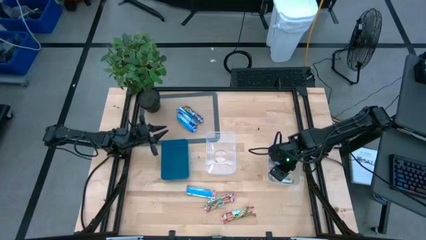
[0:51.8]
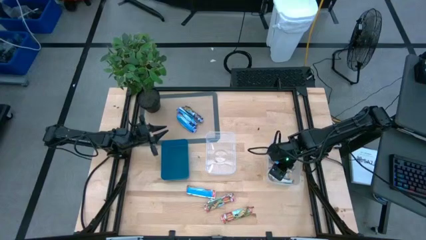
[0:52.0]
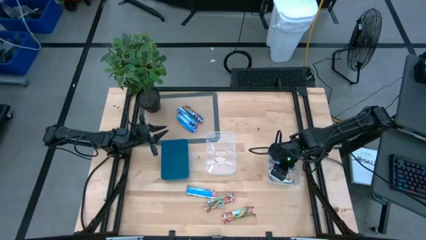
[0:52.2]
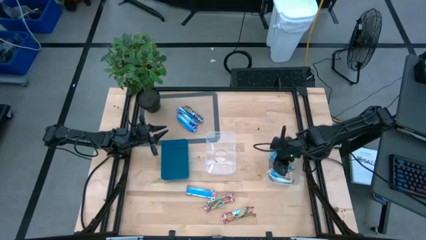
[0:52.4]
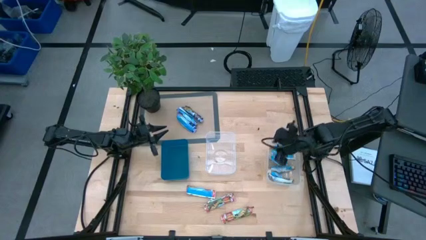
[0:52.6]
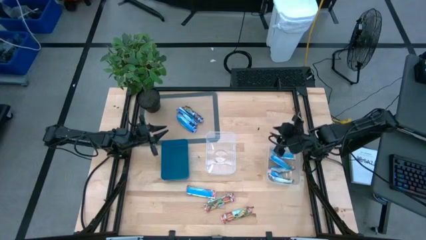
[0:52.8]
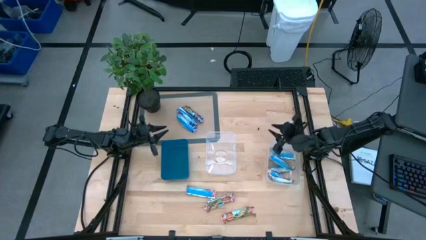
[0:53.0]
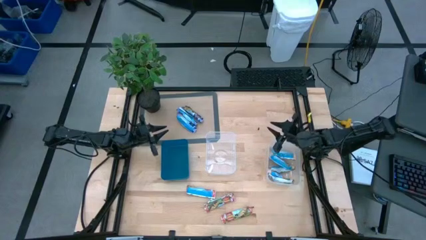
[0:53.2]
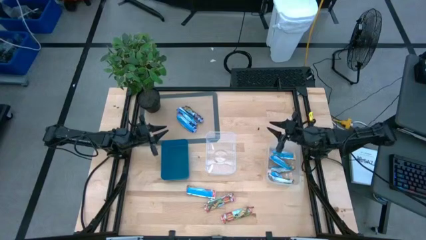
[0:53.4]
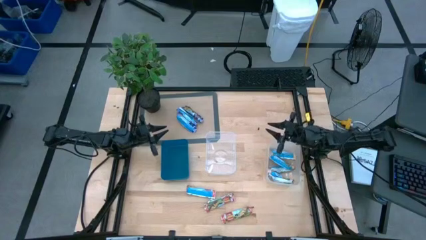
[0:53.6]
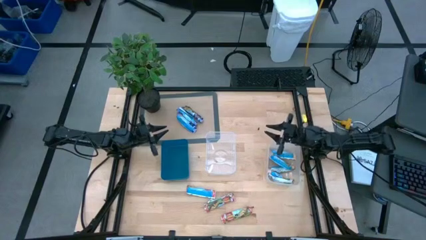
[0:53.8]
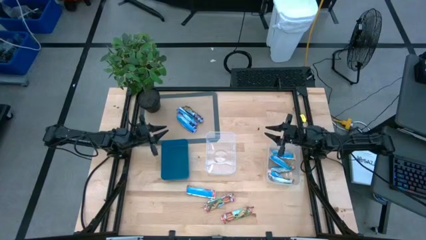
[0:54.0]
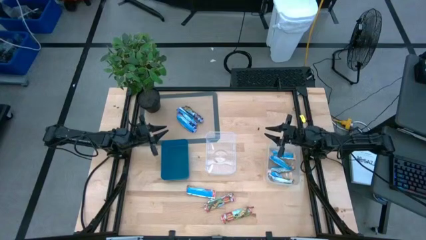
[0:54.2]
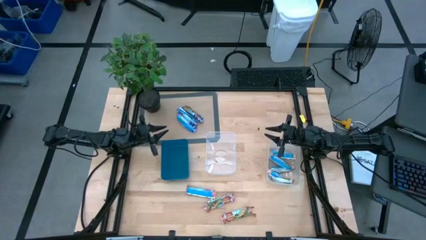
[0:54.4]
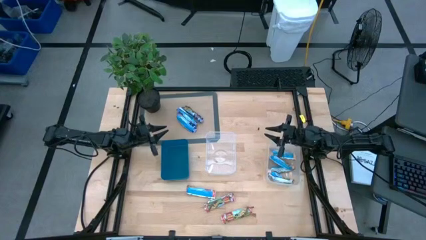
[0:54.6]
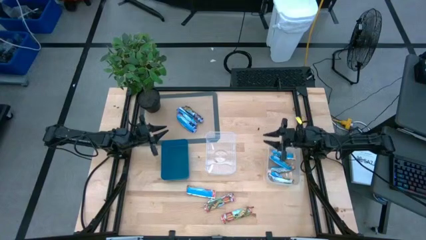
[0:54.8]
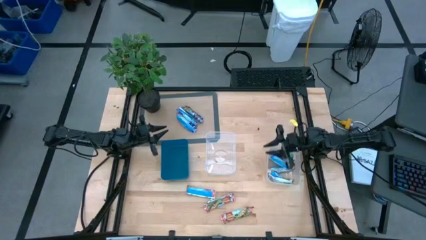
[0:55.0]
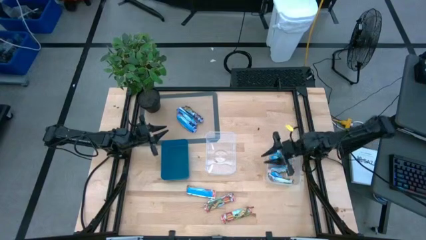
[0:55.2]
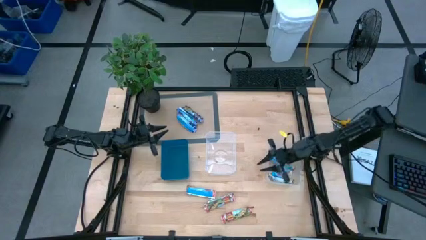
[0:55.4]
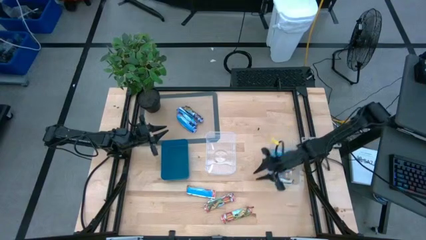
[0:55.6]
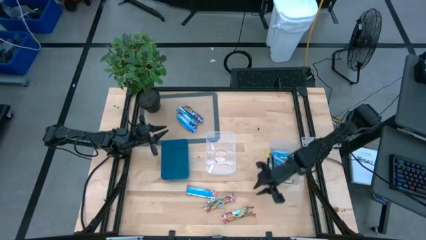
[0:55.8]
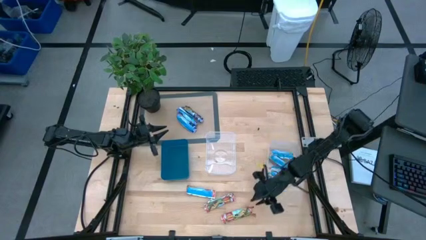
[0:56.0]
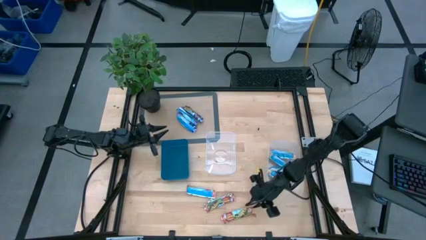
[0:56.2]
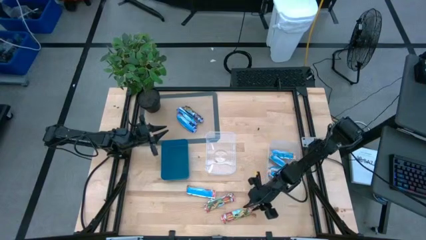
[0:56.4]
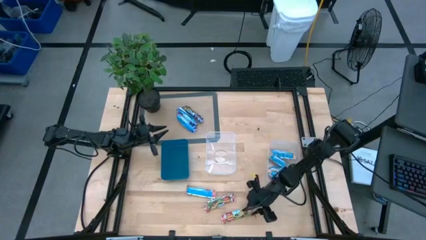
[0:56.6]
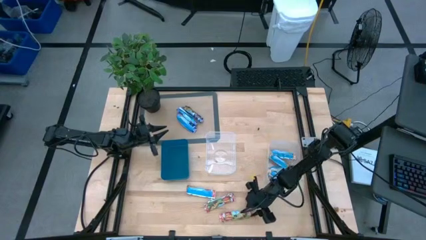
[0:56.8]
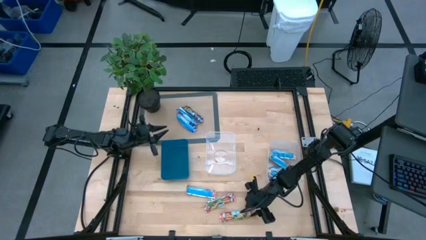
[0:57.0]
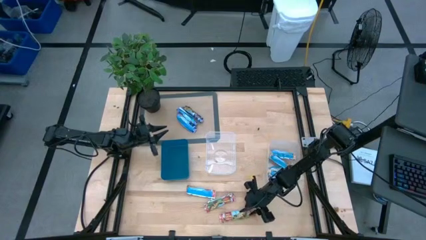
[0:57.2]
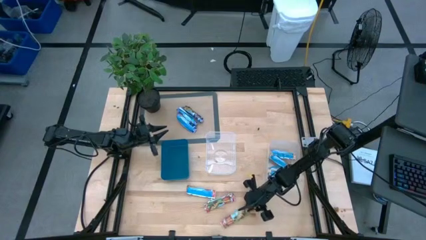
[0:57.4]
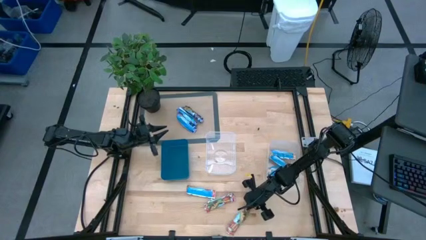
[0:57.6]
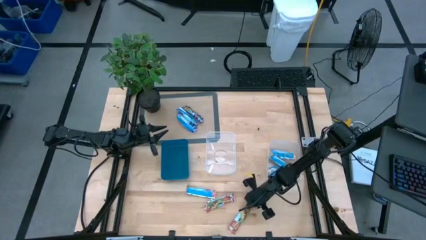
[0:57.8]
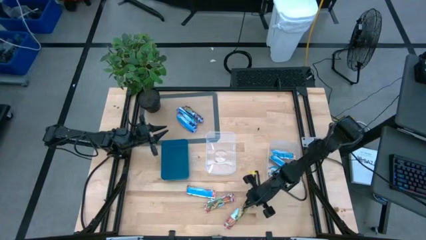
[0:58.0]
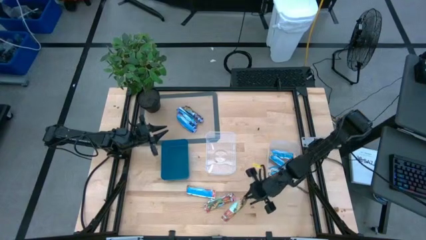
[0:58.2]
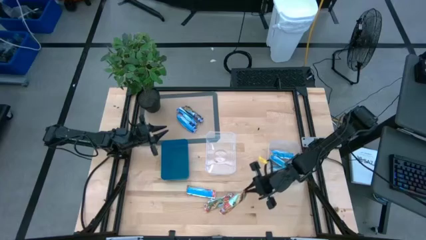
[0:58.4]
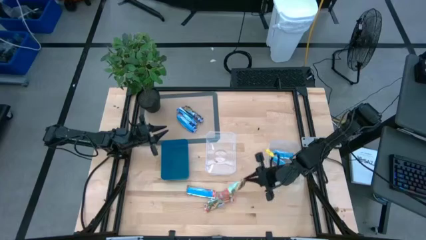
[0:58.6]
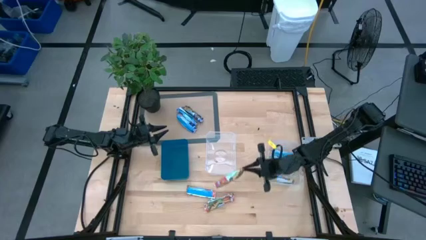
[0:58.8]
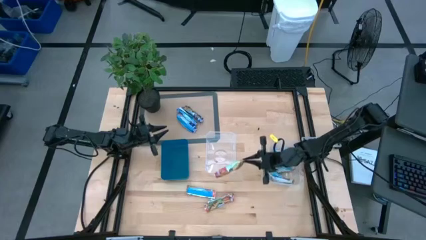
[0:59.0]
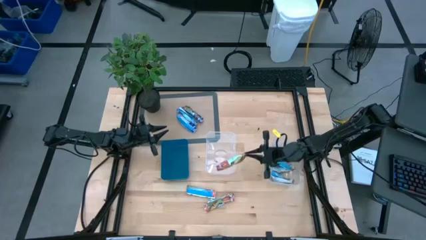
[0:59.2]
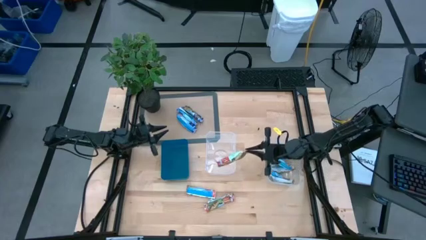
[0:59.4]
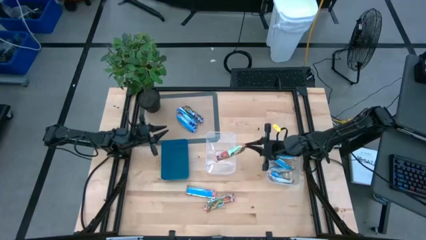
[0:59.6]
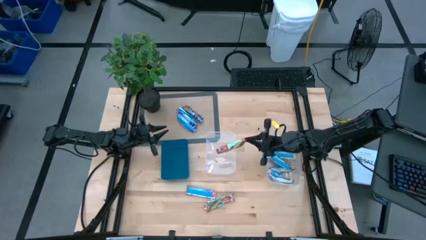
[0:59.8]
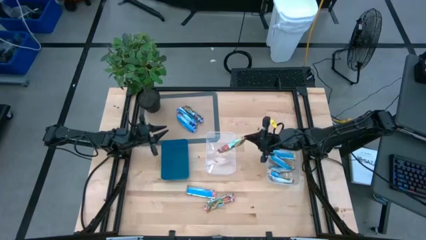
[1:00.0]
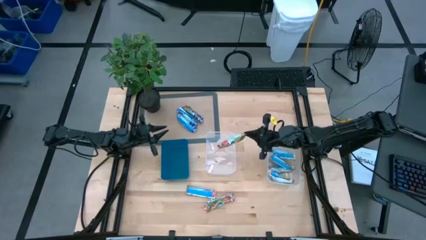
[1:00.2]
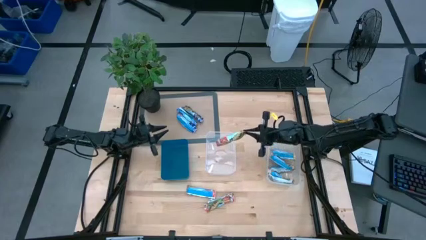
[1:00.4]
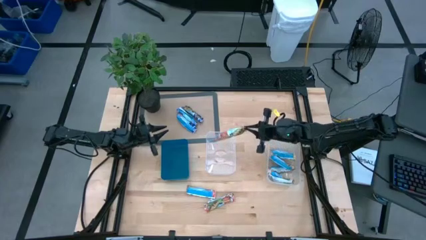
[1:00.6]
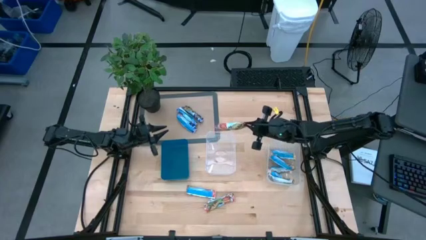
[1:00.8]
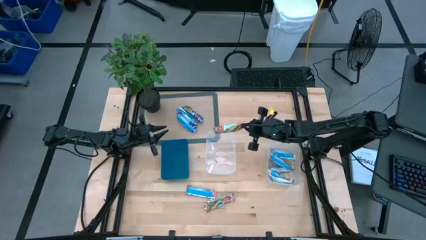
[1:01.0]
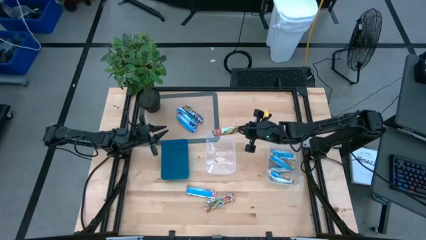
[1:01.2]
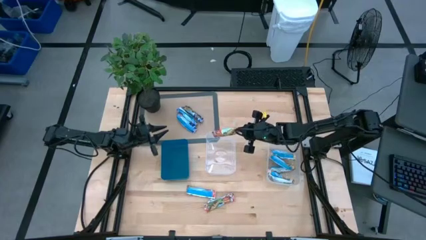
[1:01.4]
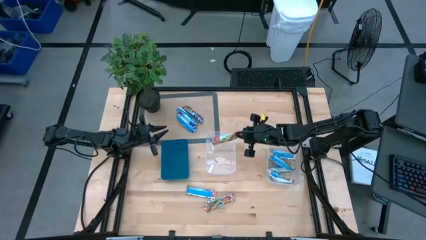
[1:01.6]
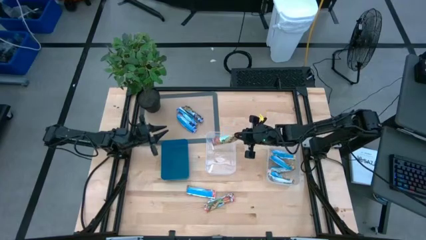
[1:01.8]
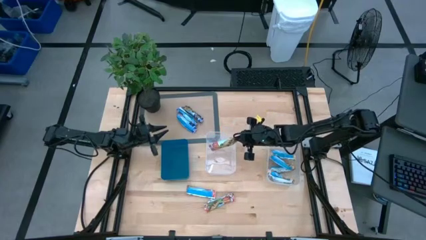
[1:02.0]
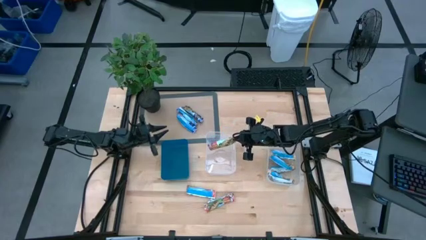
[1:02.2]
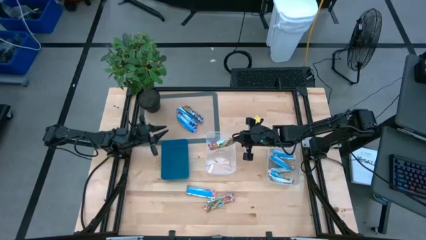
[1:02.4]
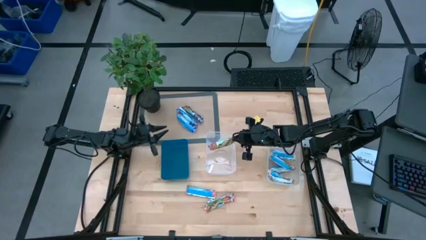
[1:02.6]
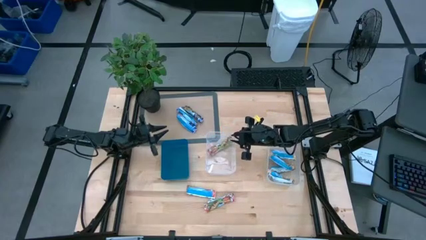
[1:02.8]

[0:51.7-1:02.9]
Task: Pick and place Granola Bars by type
Put the red granola bar into the left transparent bin

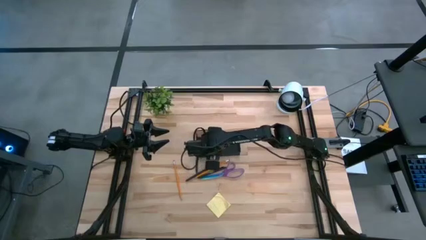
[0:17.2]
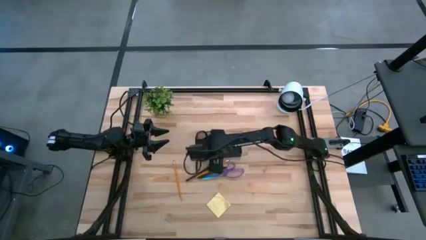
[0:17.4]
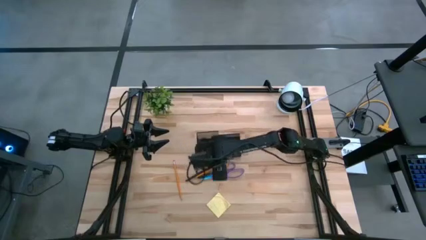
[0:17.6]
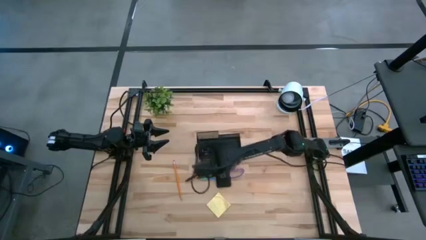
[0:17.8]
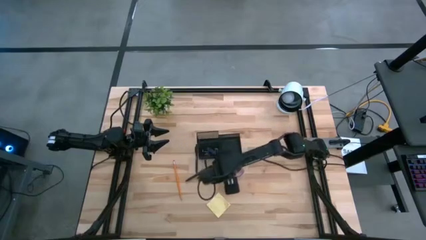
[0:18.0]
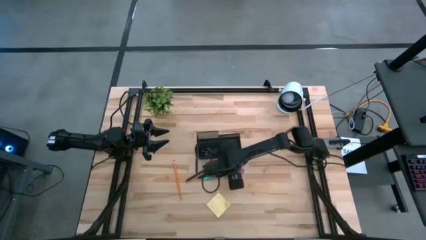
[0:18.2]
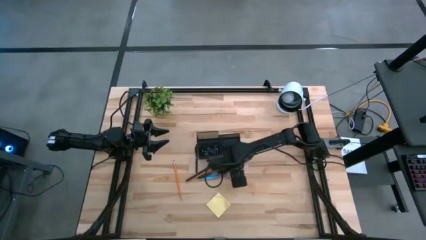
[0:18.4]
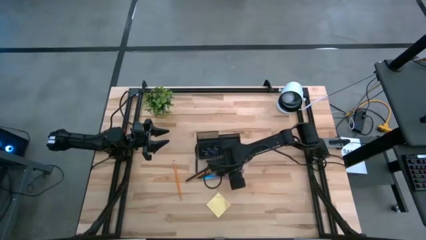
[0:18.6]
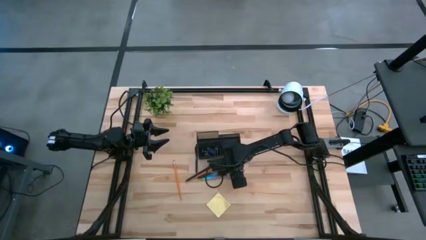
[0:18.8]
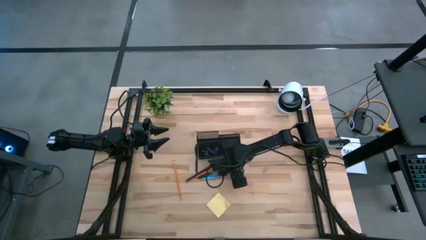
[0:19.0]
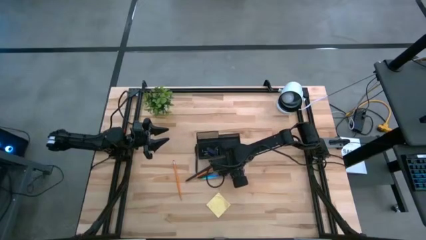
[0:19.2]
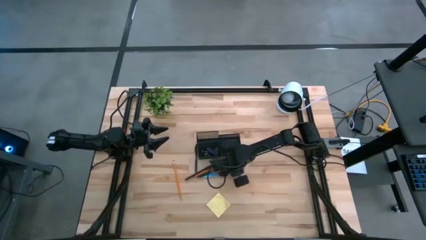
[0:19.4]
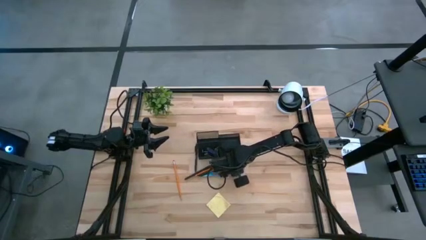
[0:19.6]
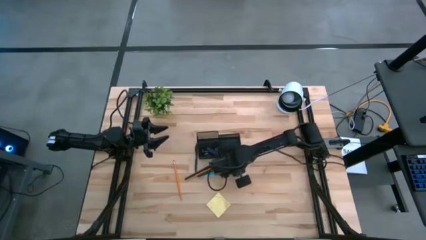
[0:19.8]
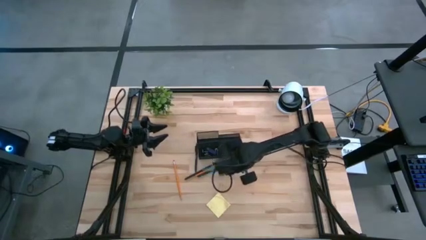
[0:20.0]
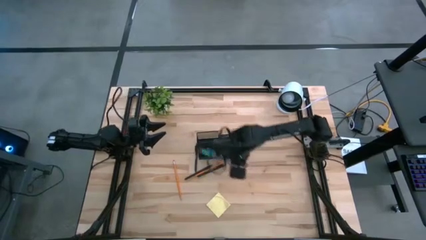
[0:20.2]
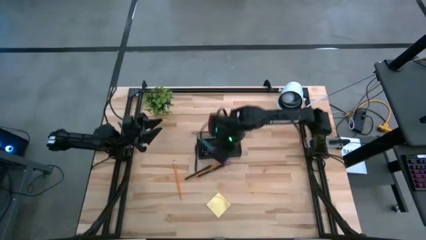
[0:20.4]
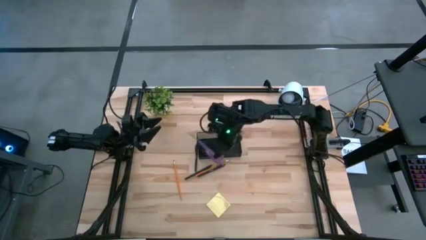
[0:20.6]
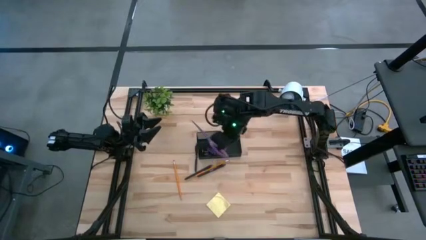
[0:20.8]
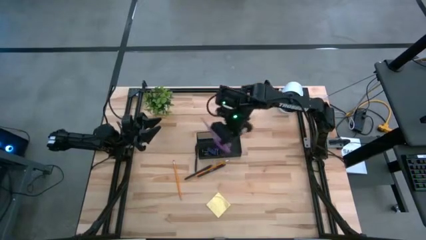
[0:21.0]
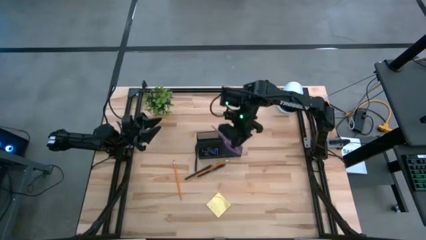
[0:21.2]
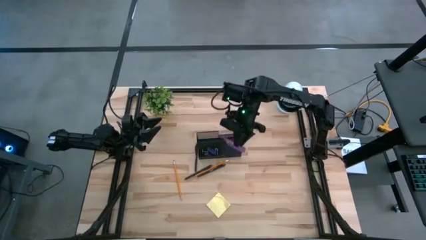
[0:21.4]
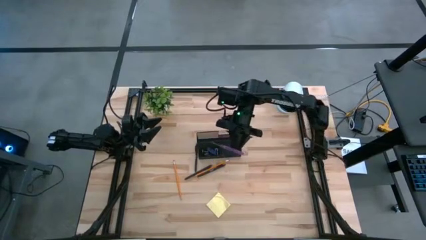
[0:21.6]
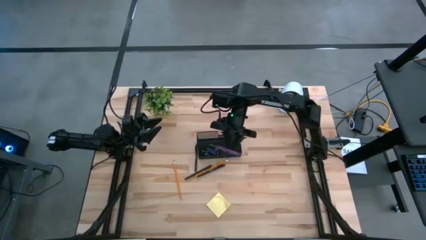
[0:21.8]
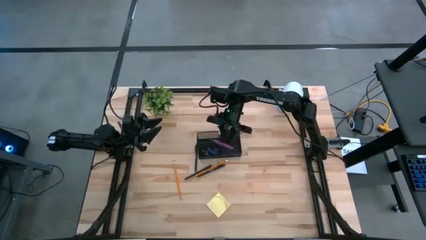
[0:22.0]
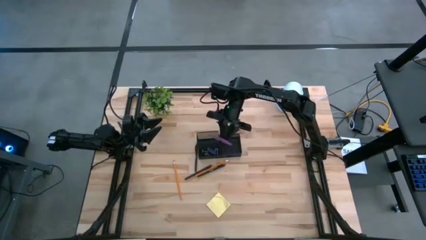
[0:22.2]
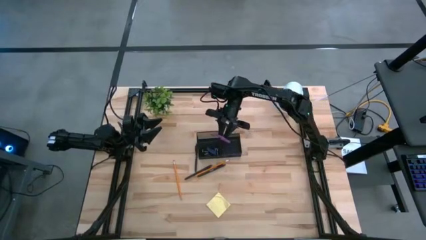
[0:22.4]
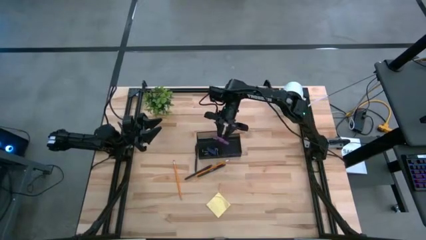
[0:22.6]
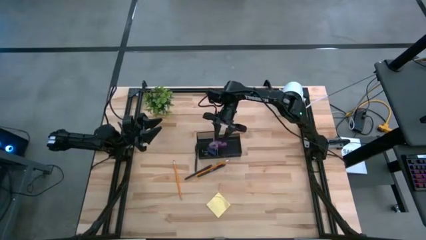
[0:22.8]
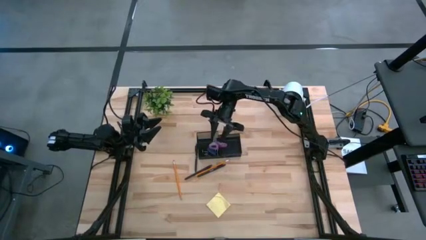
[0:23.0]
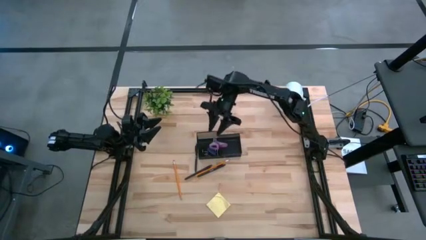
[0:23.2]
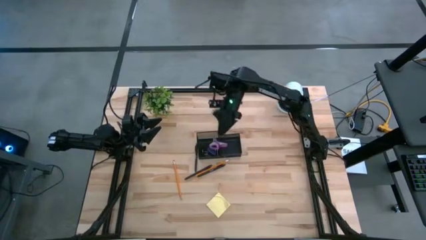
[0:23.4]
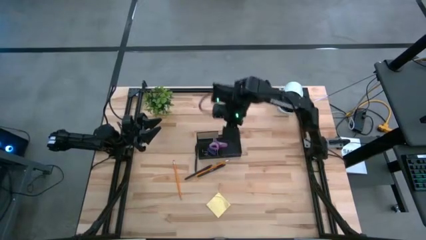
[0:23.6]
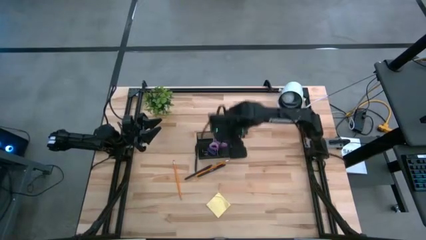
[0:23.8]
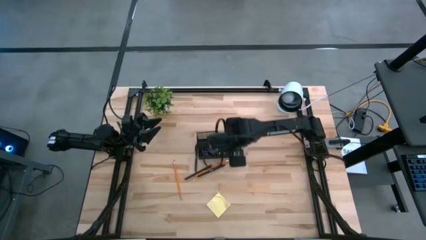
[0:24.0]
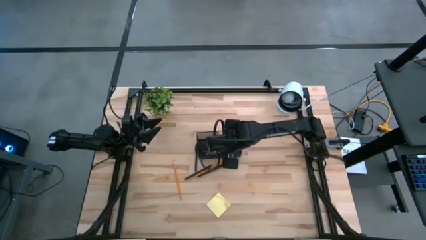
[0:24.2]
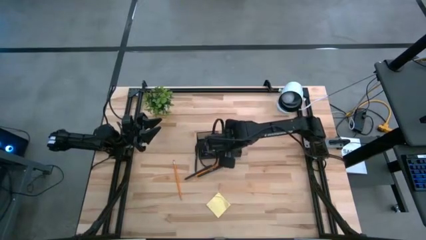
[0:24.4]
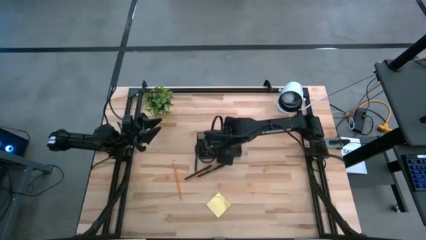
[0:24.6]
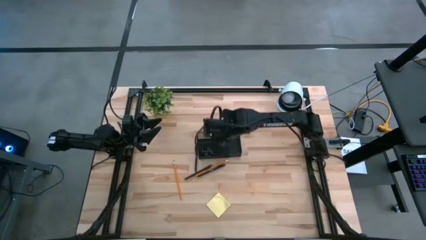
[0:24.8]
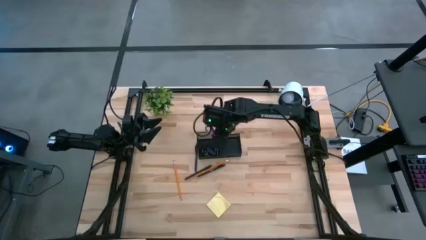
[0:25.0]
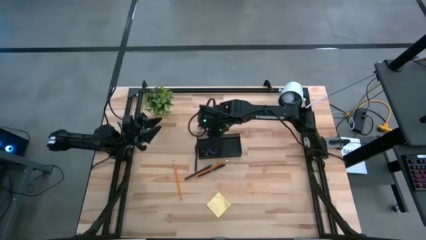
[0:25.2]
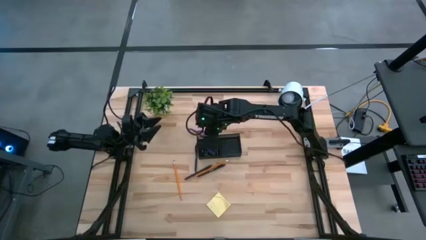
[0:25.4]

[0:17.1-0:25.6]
Task: Pick and place office supplies into organizer
Put the purple scissor into the black desk organizer
